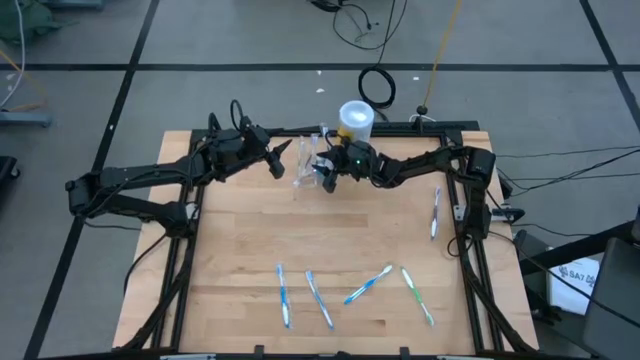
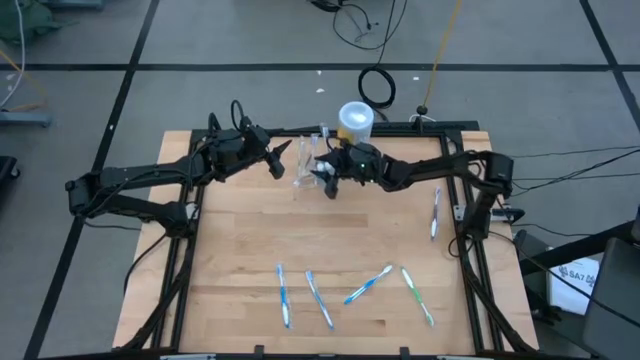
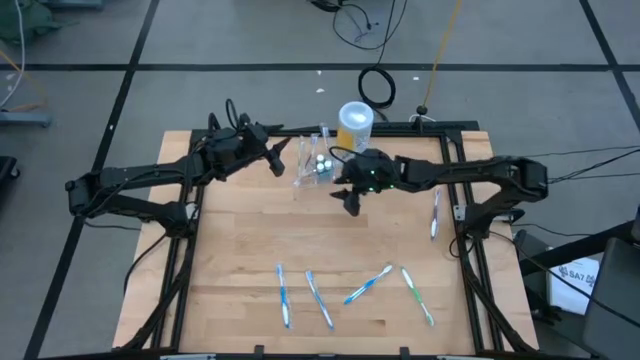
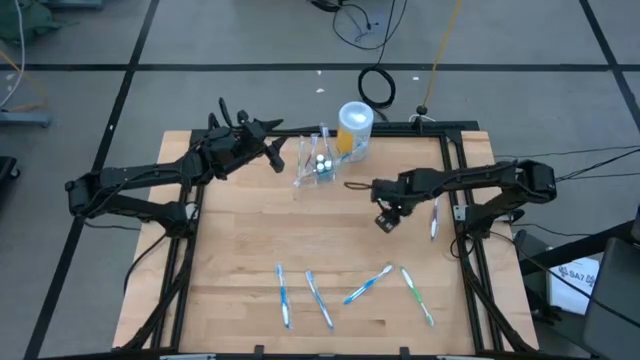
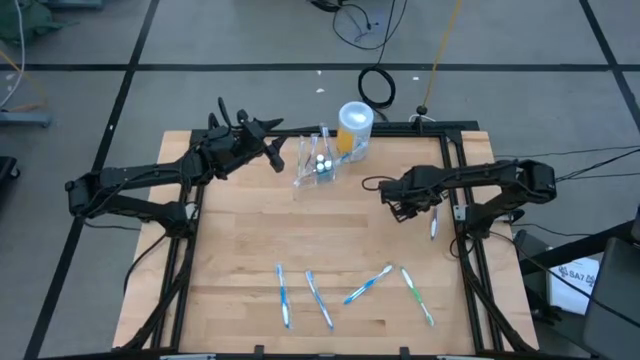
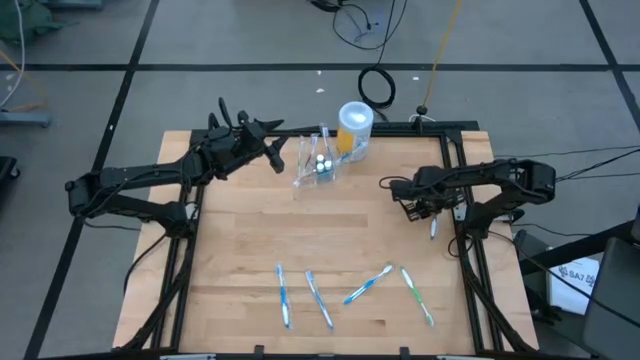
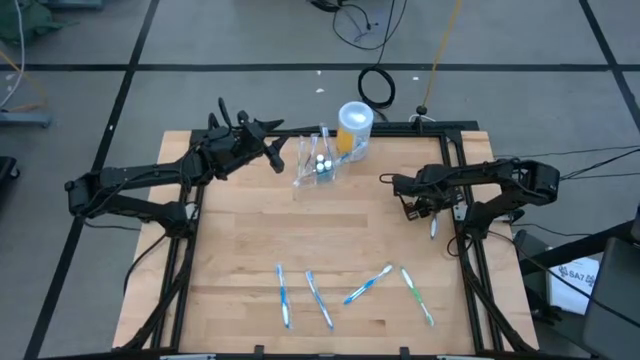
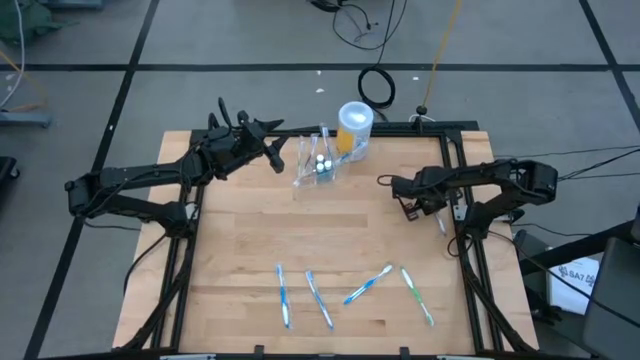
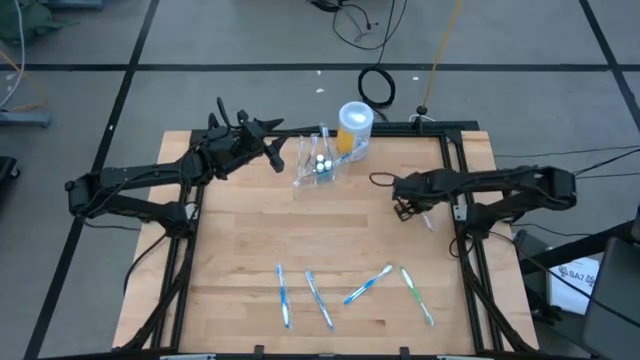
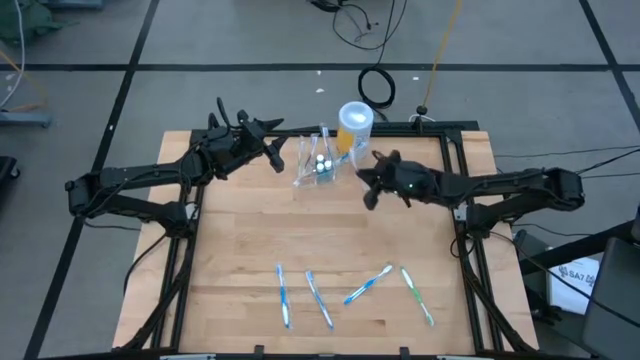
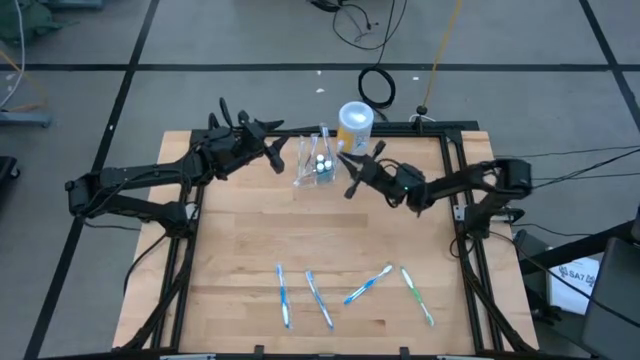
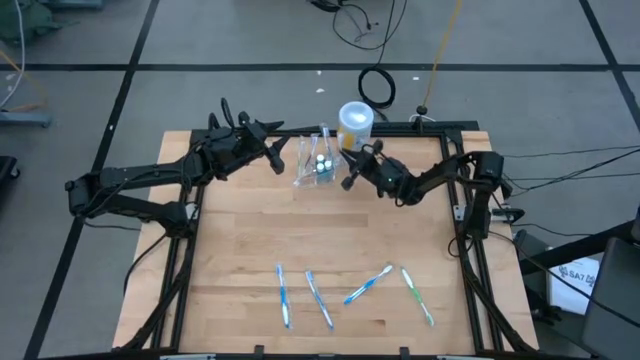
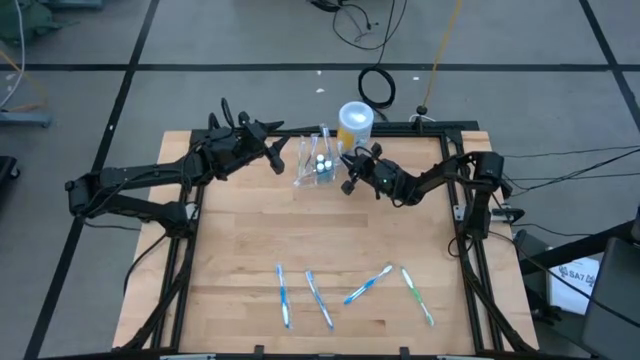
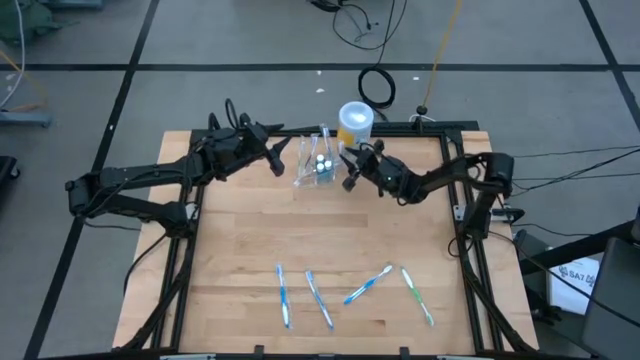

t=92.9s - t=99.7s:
Task: Pick & Place toothbrushing station
Put the violet toothbrush into the right section of the transparent organizer

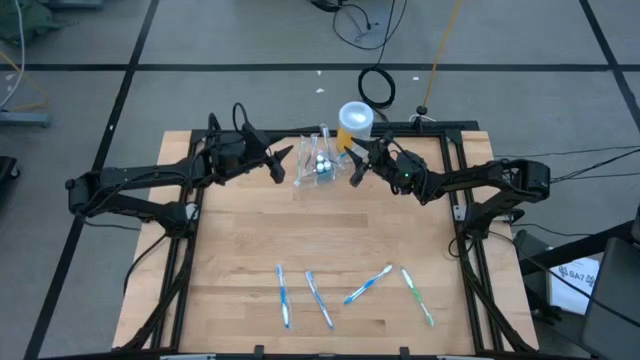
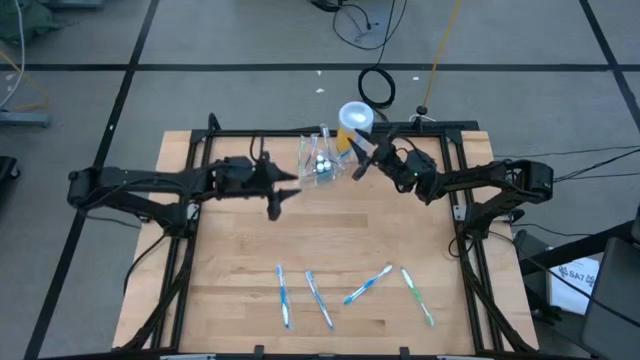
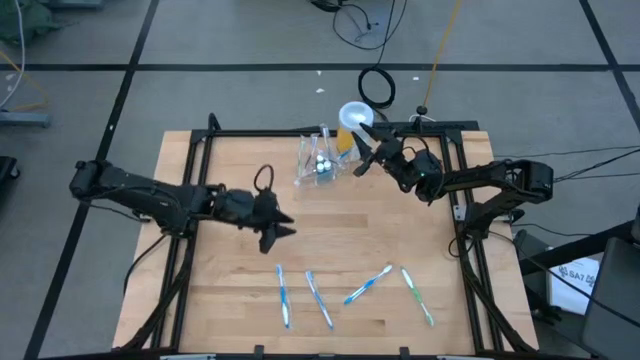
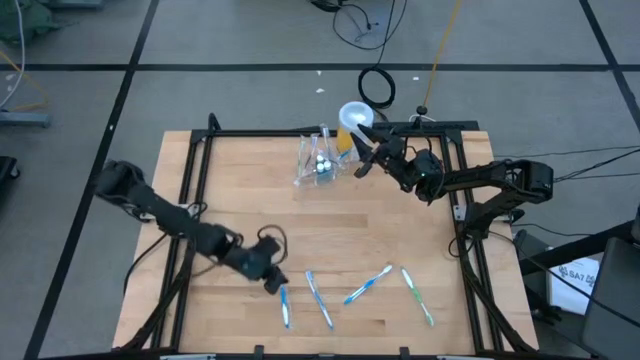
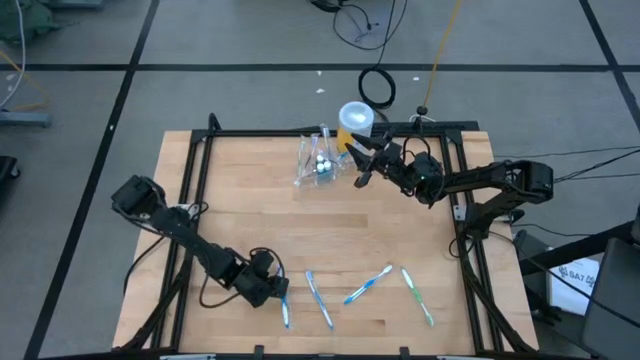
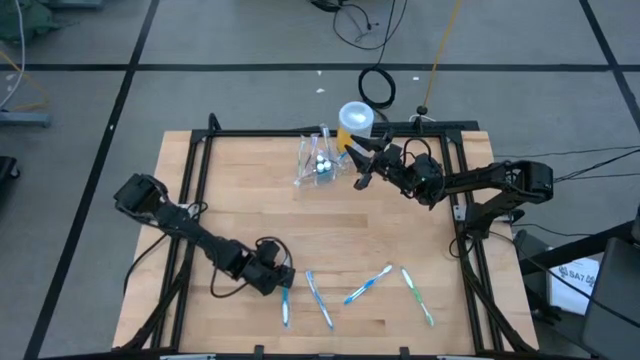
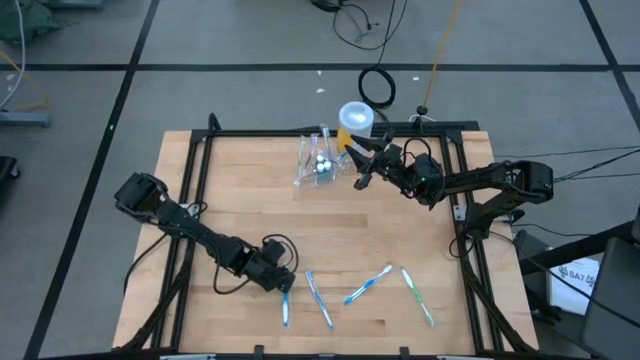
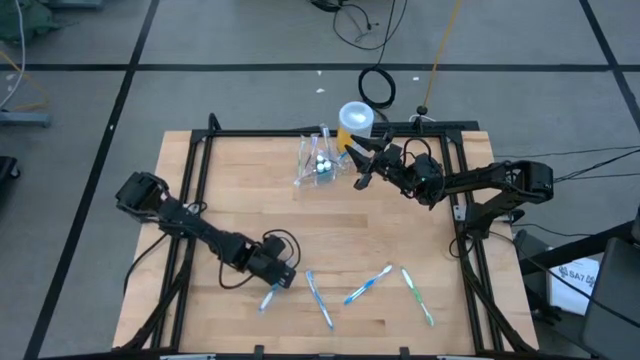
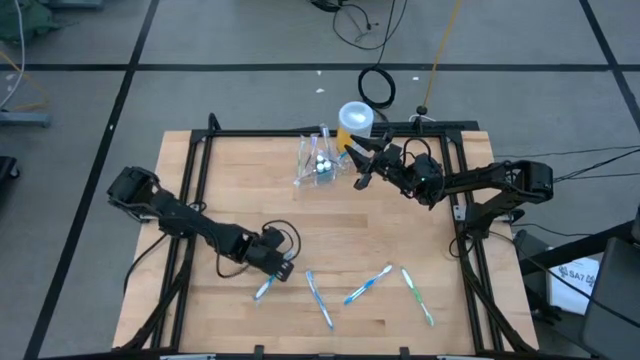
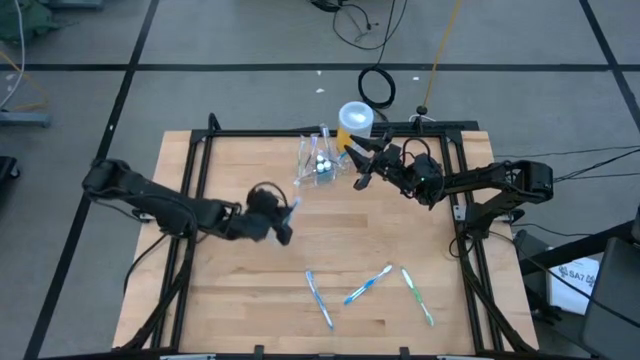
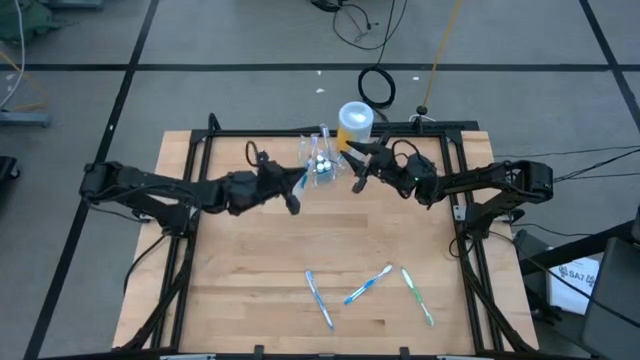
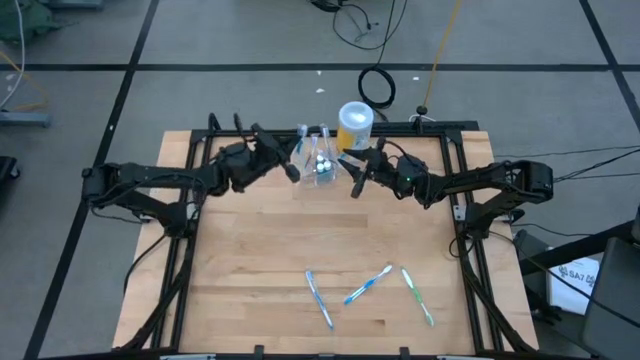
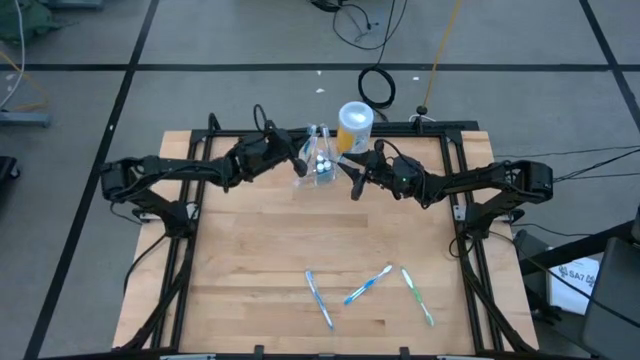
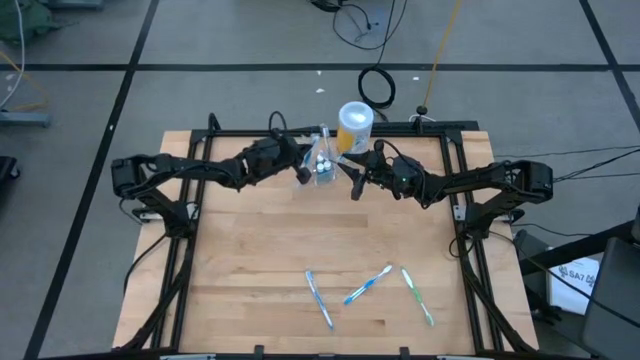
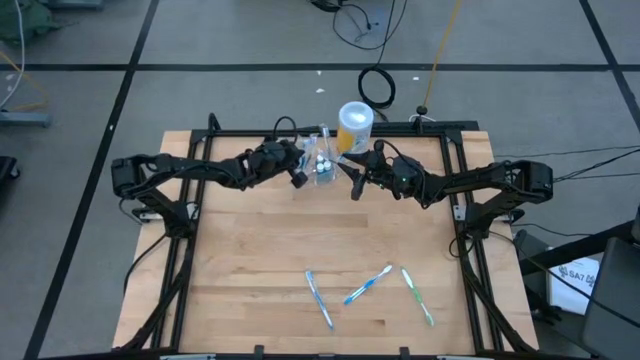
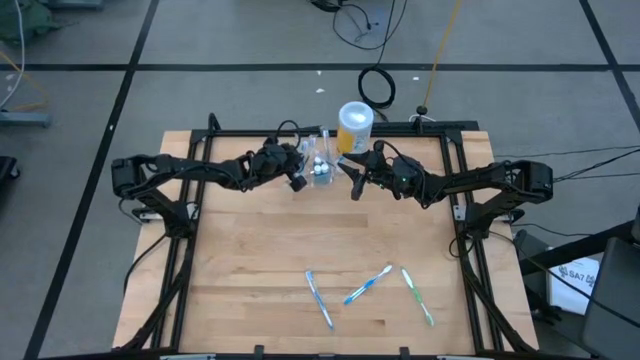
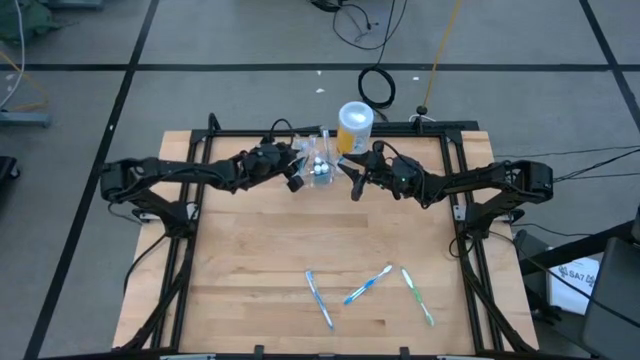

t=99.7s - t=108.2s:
Put the left blue toothbrush into the left section of the transparent organizer

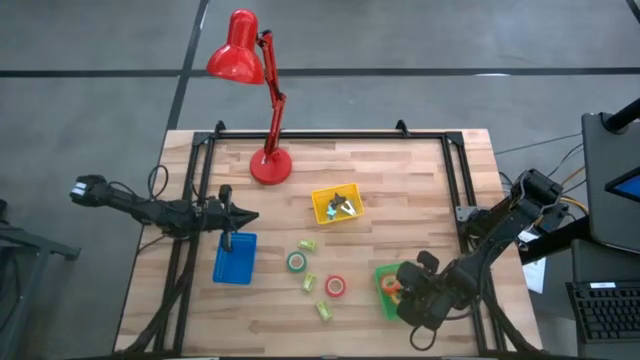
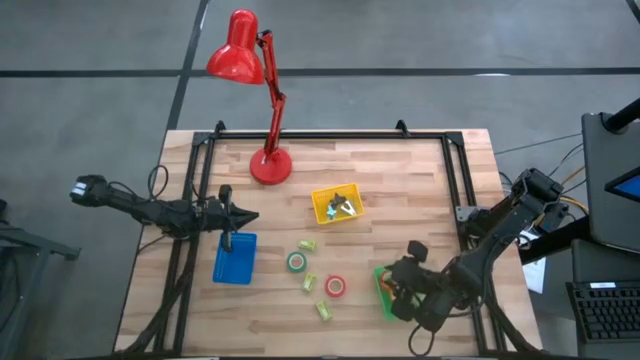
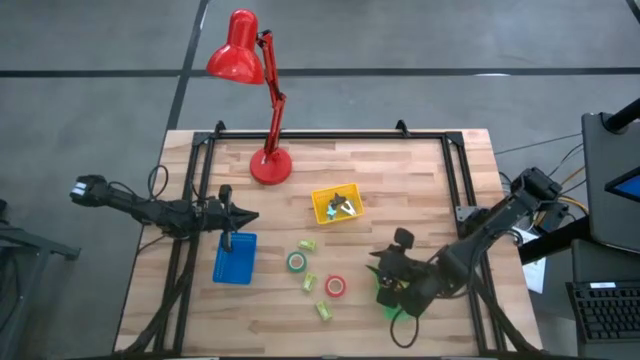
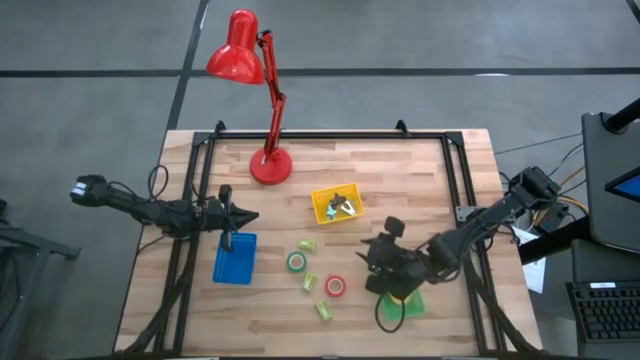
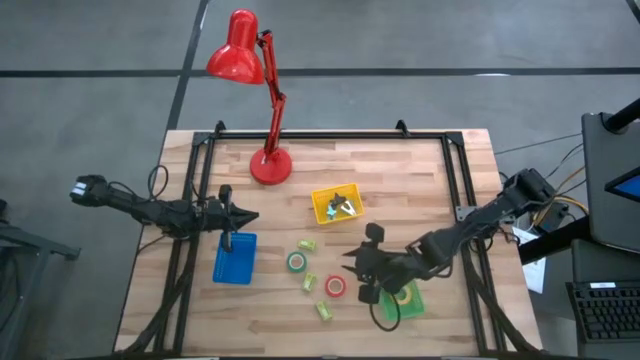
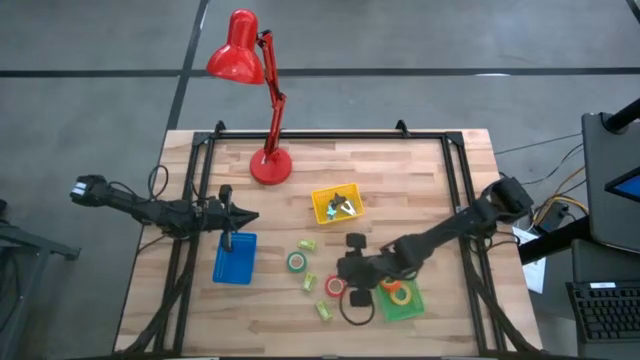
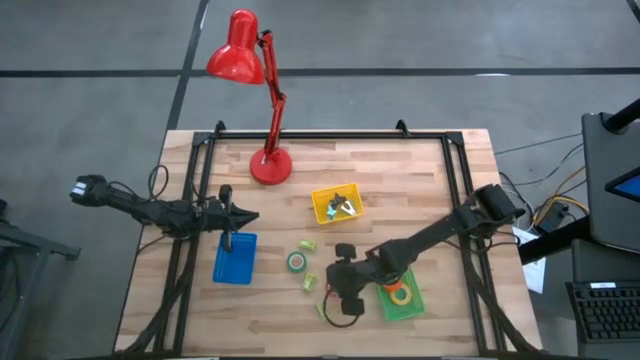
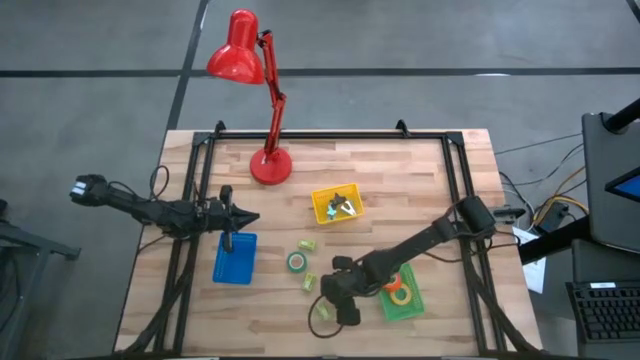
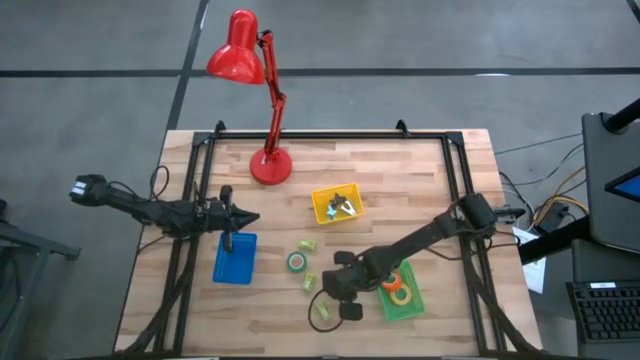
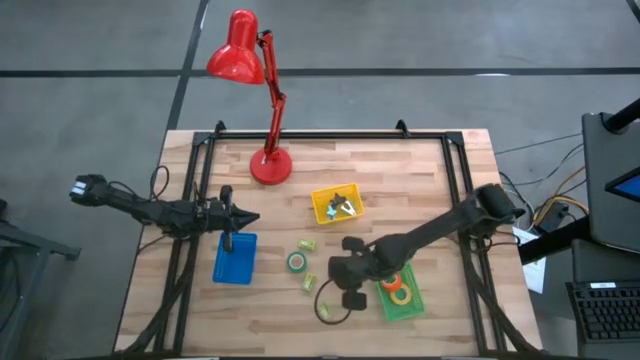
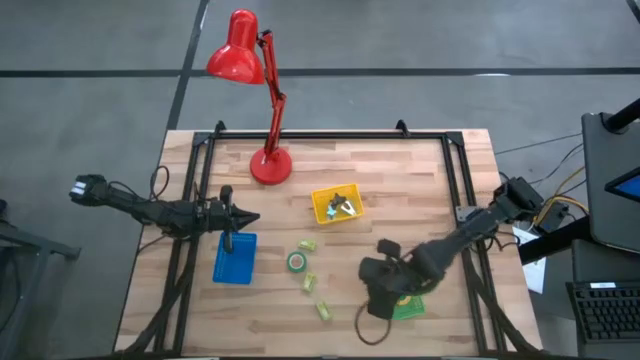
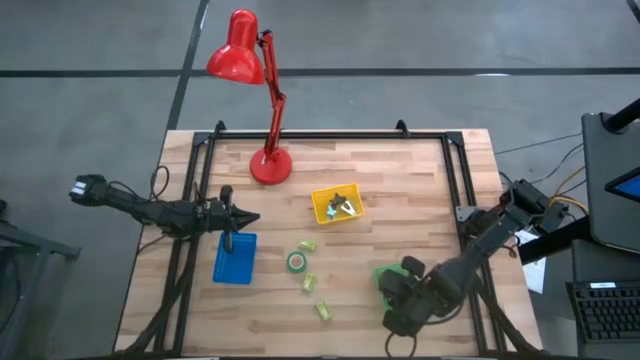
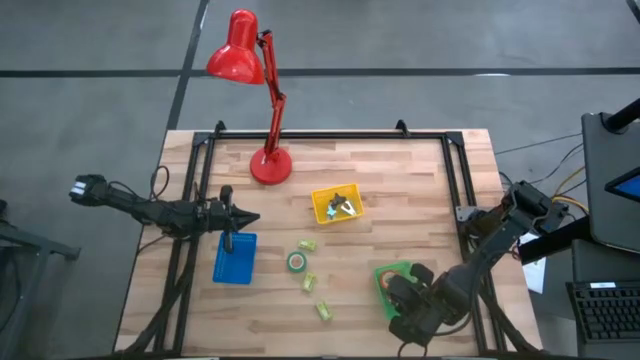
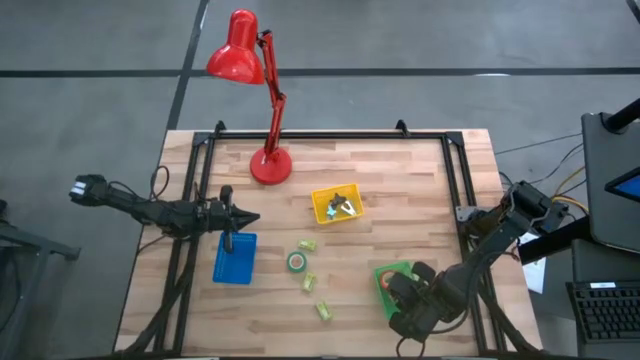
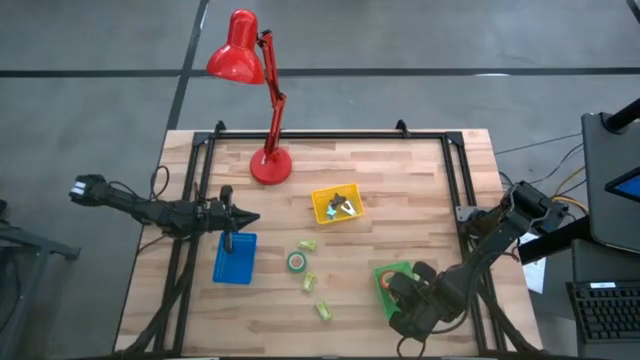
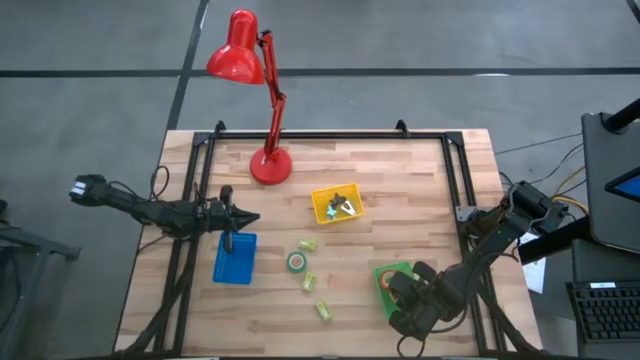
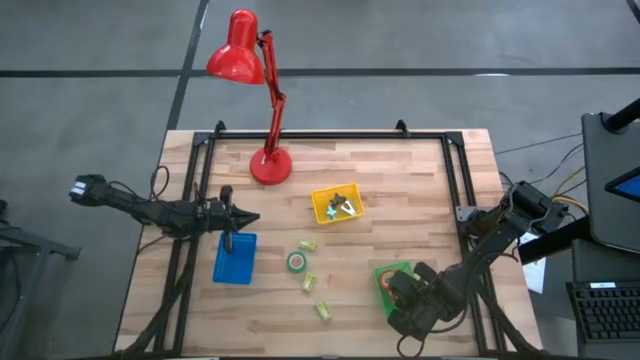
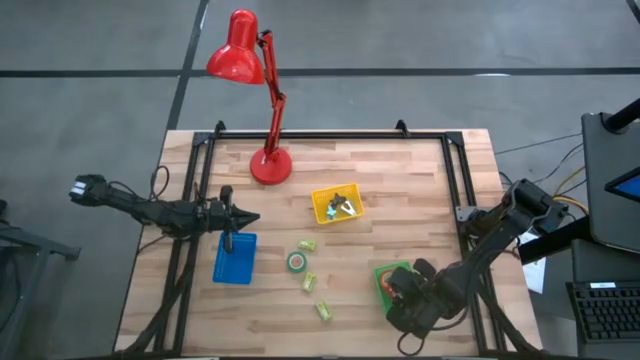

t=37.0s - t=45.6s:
Task: Pick and place Stapler, Stapler remover, tape
Put the red tape into the green bin
